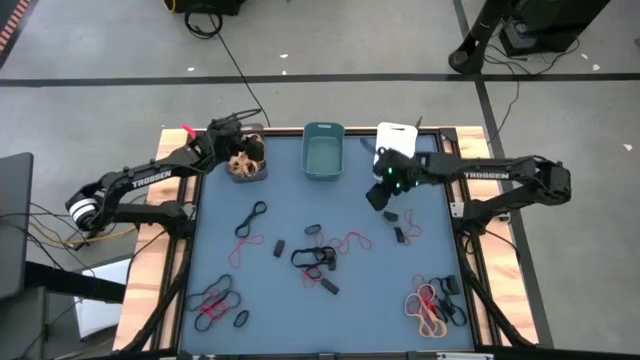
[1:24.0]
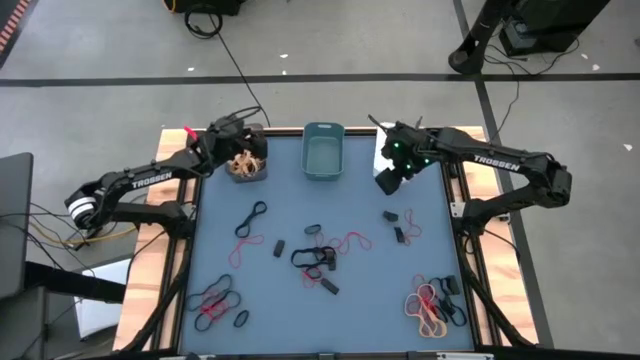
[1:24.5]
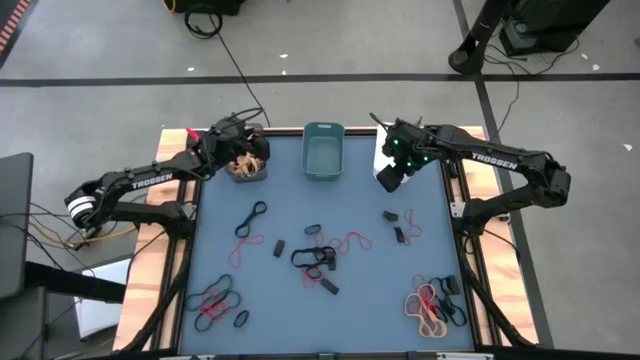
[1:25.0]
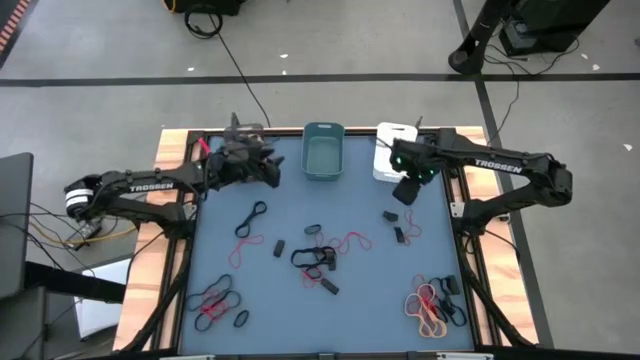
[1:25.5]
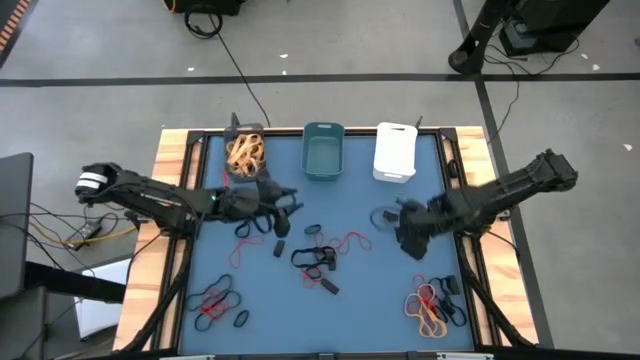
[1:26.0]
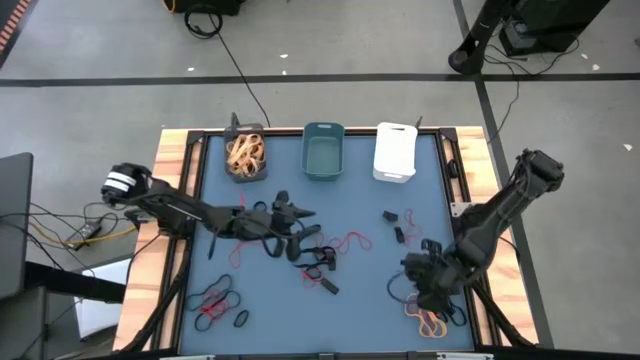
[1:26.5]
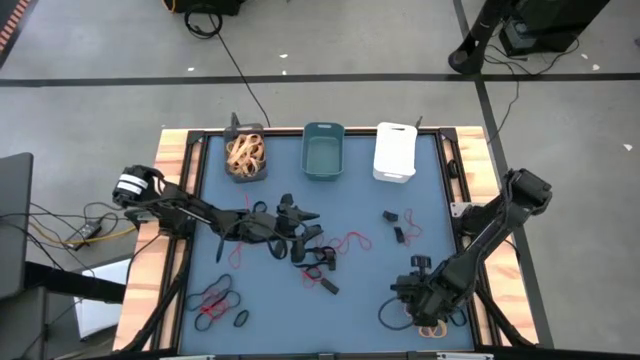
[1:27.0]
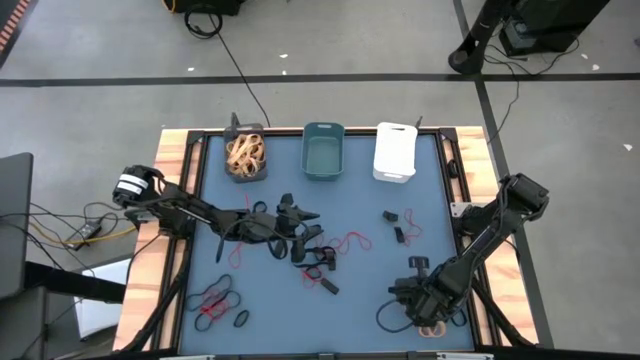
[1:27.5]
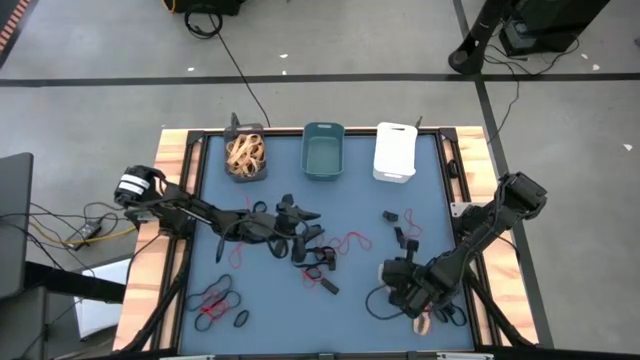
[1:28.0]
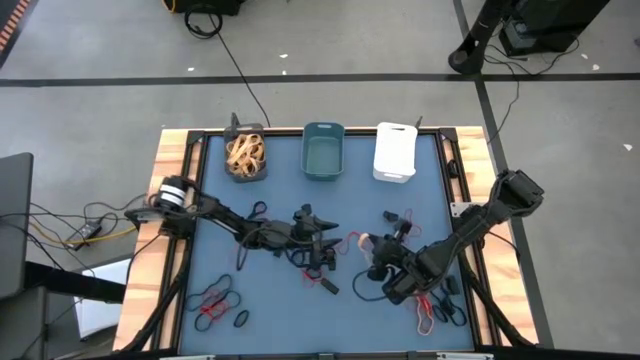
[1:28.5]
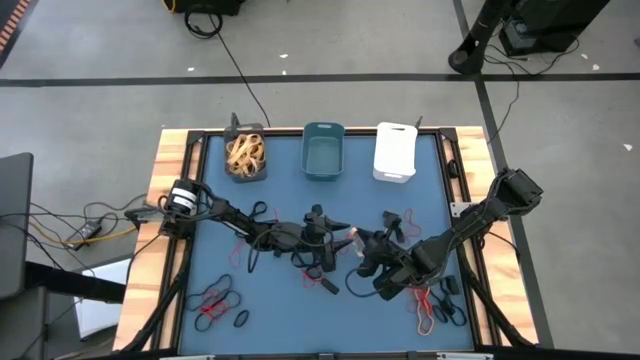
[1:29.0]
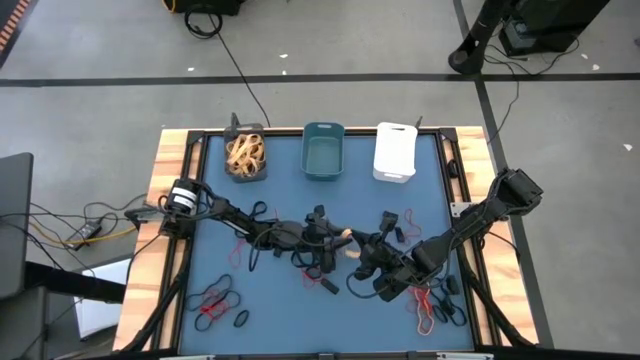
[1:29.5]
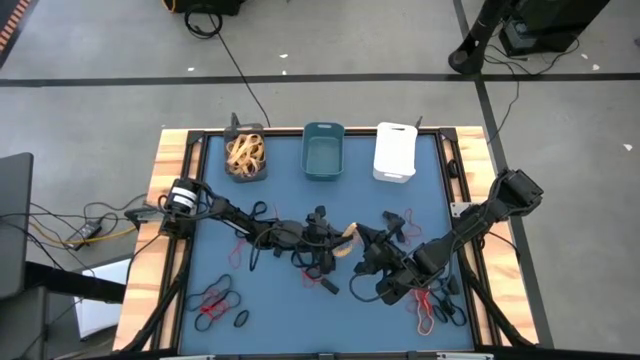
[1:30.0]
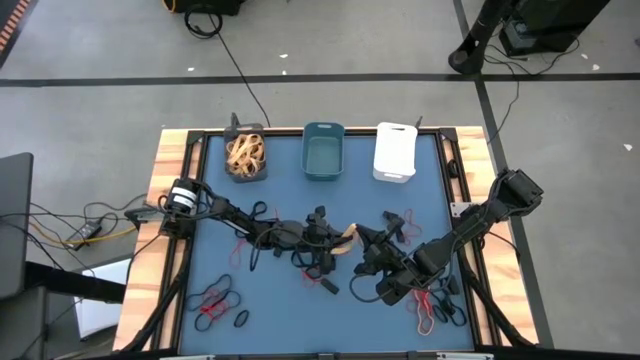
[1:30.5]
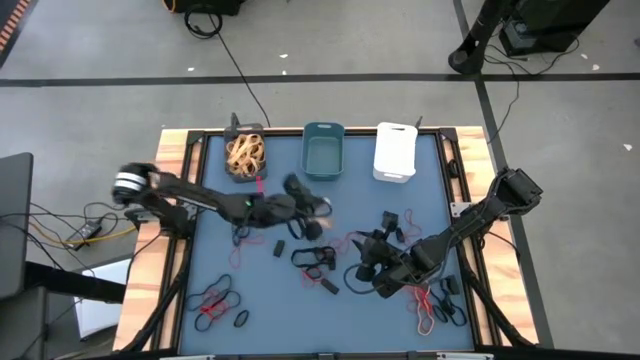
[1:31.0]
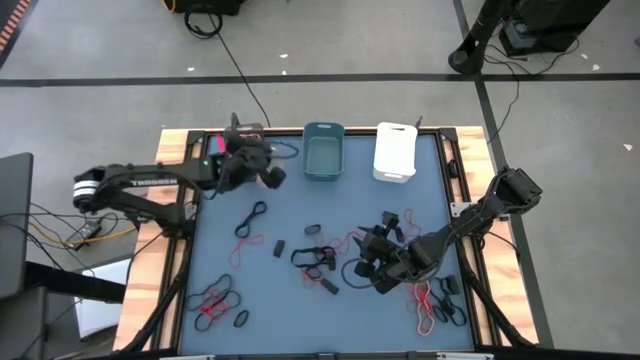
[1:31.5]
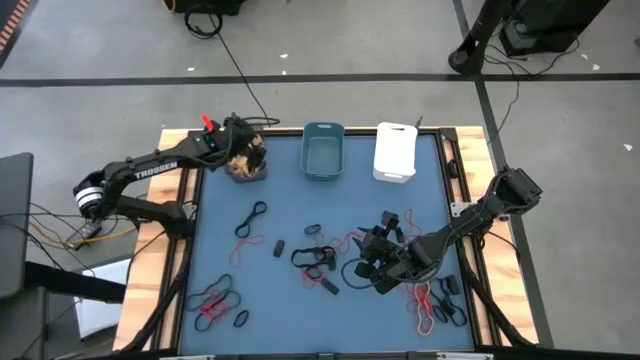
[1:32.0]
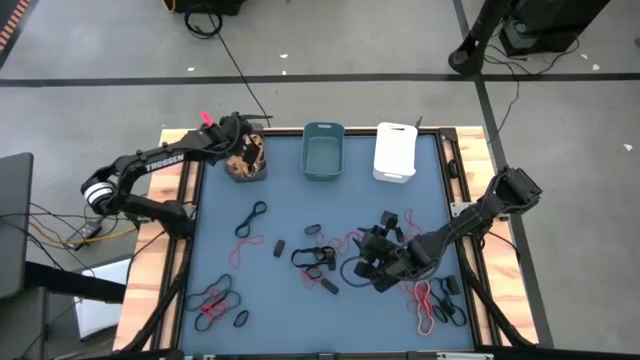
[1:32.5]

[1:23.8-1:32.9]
Task: Sort rubber bands into baskets
Put the yellow rubber band into the black bin

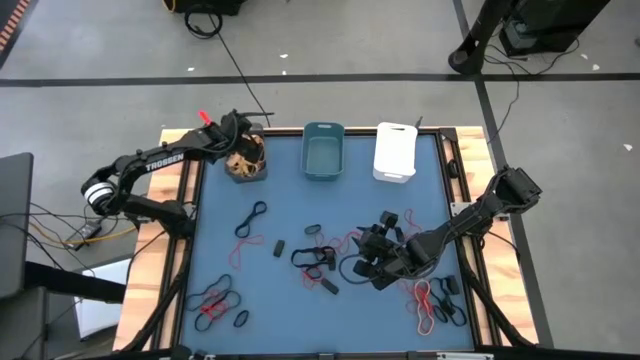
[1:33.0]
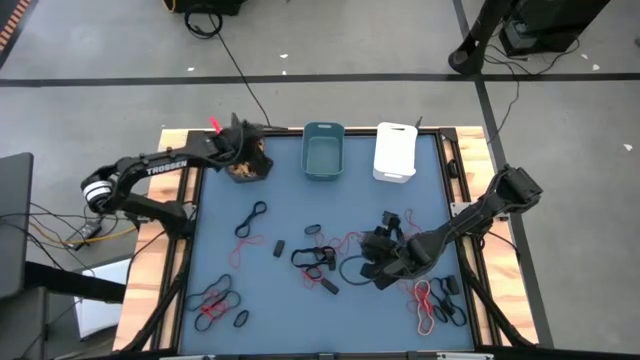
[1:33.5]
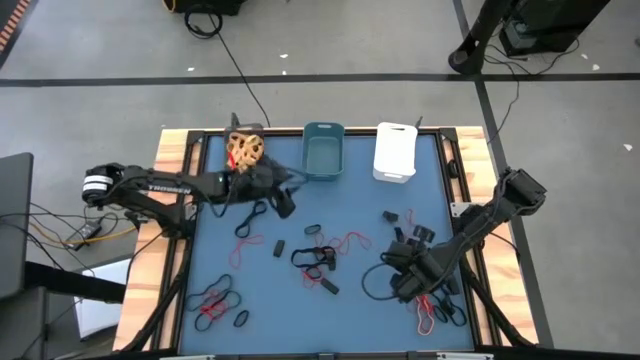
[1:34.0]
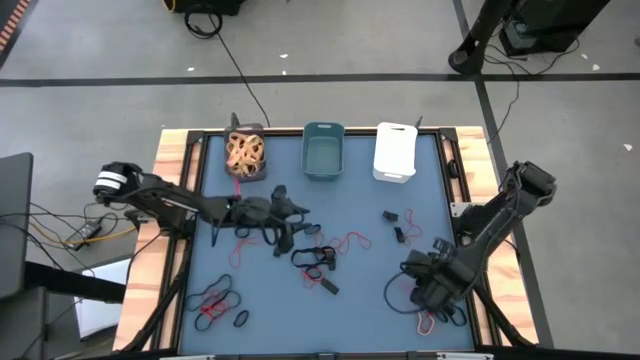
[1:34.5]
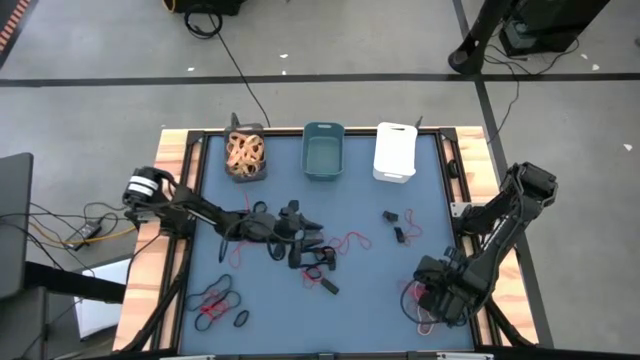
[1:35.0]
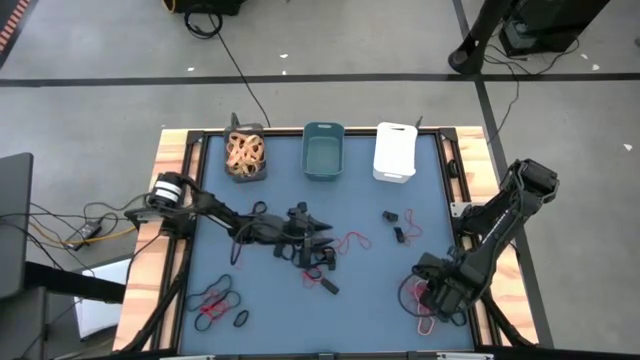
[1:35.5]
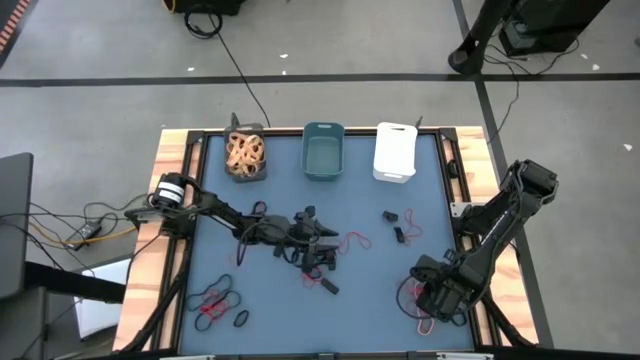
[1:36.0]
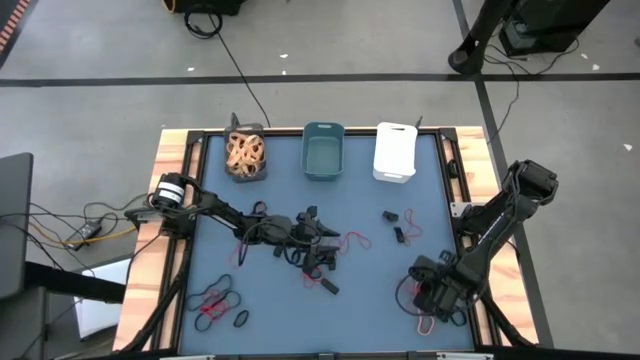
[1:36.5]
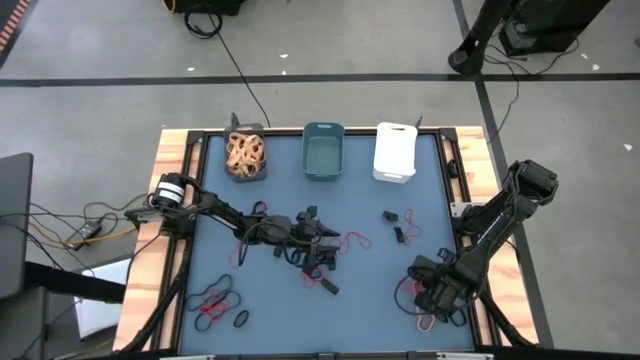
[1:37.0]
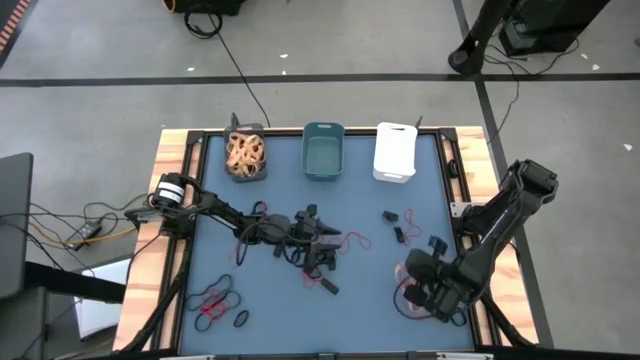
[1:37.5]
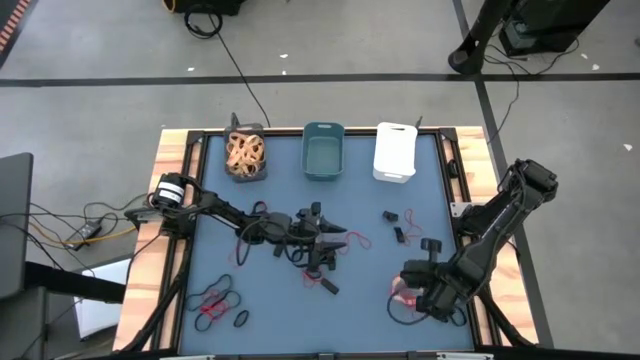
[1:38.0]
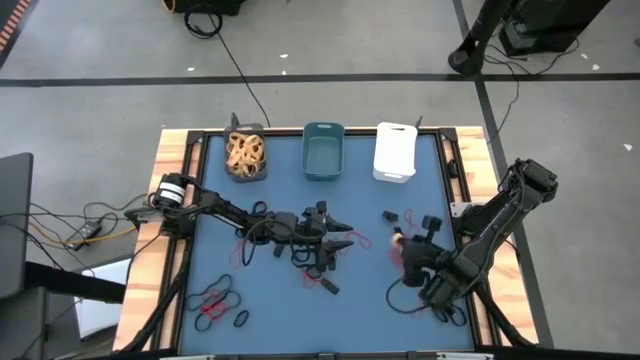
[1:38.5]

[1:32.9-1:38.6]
Put the yellow rubber band into the black bin

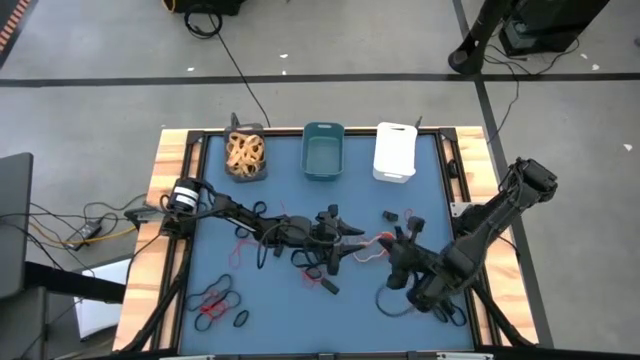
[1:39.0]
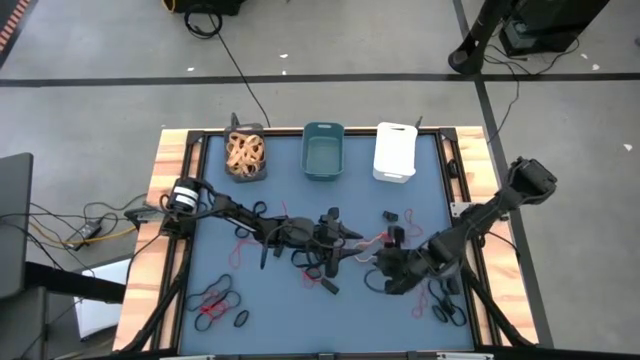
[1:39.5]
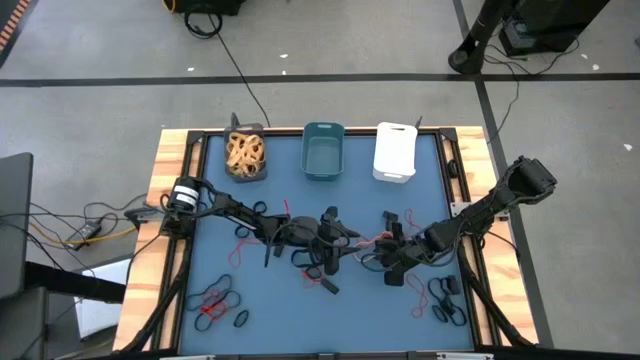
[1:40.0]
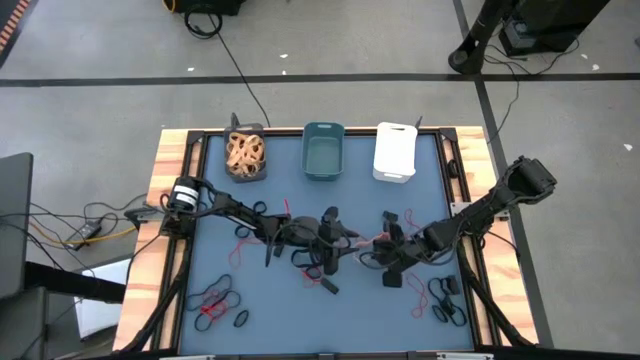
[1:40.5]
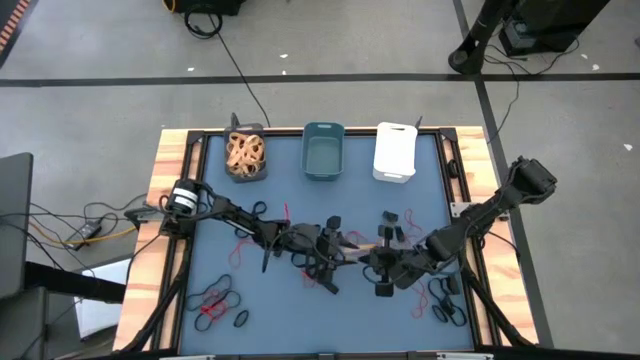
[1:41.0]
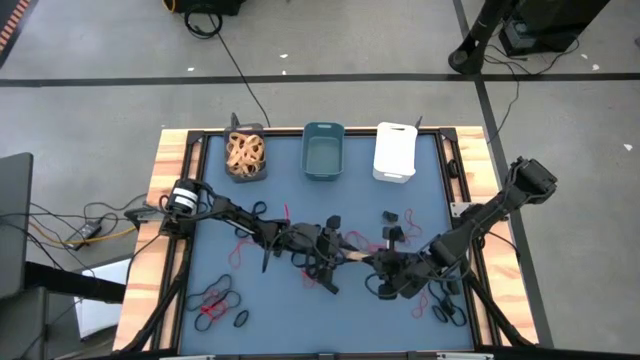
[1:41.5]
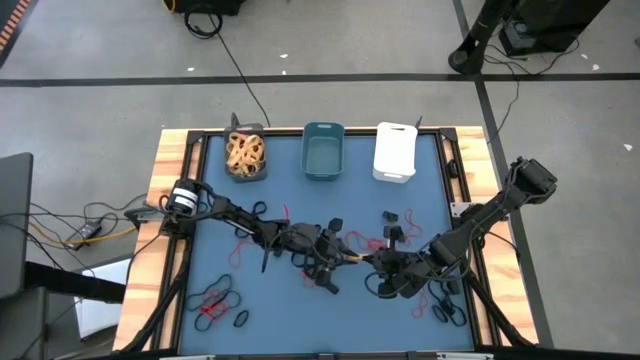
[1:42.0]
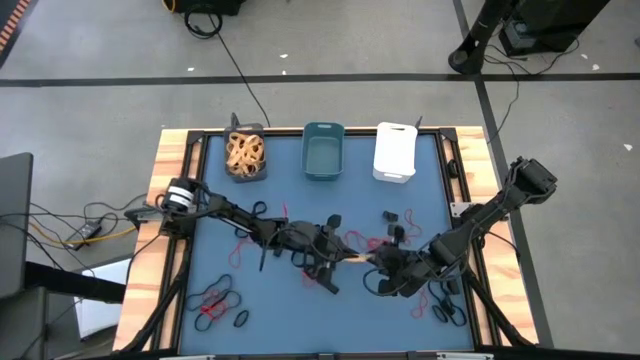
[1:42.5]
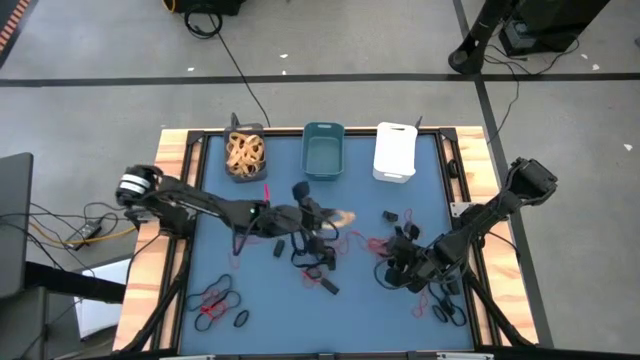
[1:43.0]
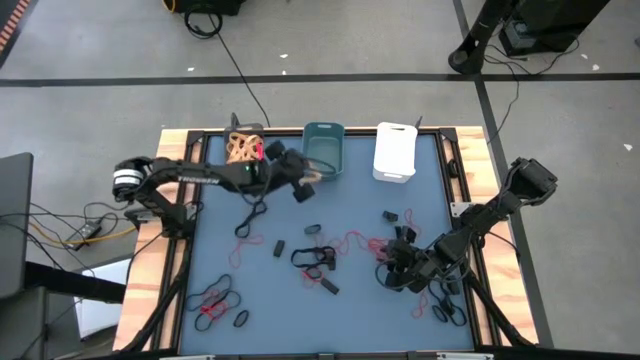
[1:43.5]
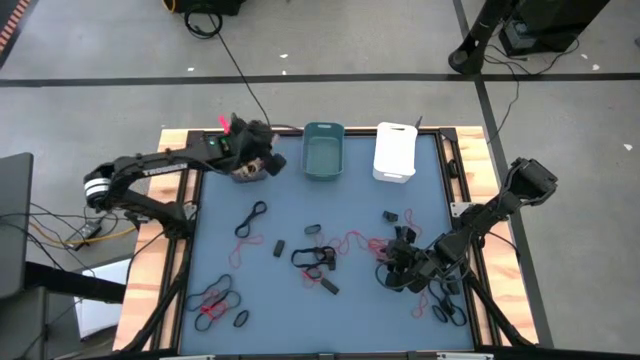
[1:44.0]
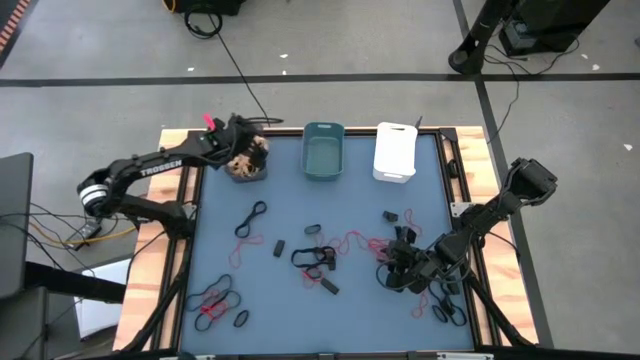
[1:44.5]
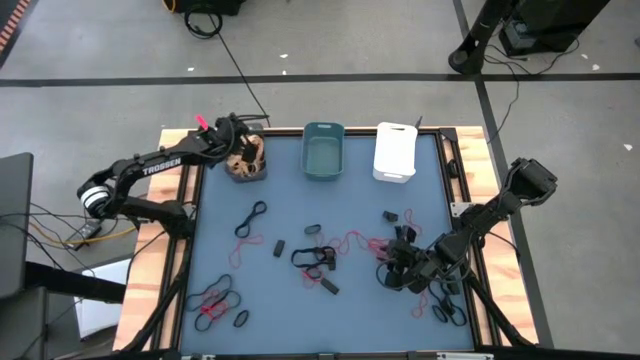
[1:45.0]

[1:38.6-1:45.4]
Put the yellow rubber band into the black bin
